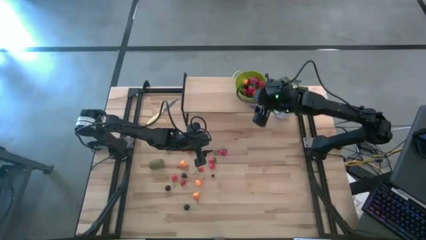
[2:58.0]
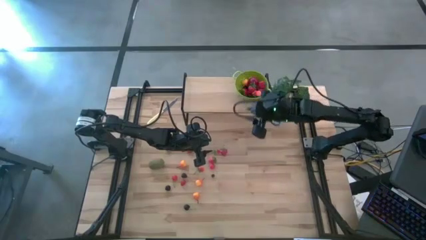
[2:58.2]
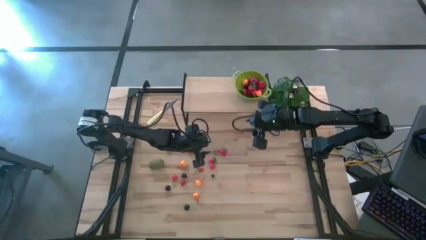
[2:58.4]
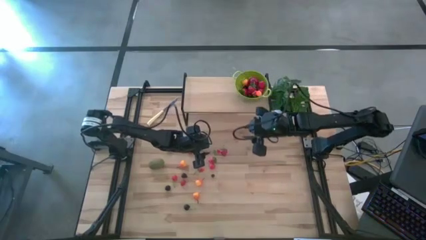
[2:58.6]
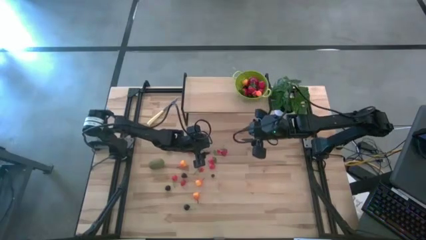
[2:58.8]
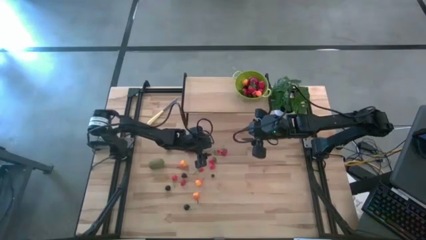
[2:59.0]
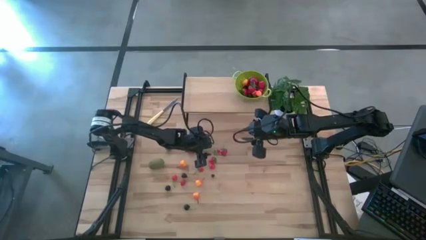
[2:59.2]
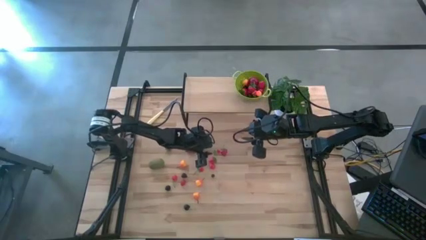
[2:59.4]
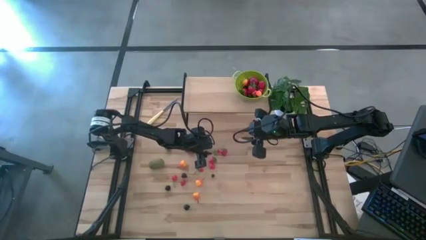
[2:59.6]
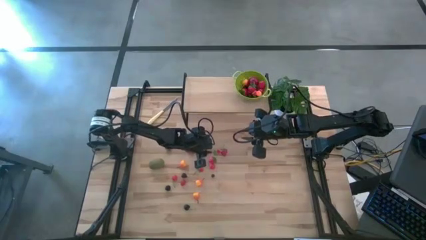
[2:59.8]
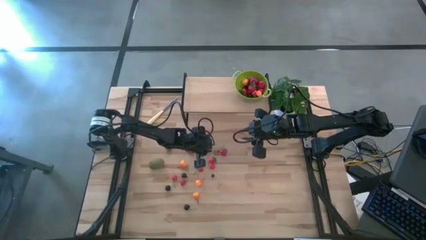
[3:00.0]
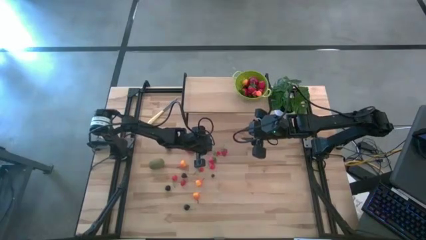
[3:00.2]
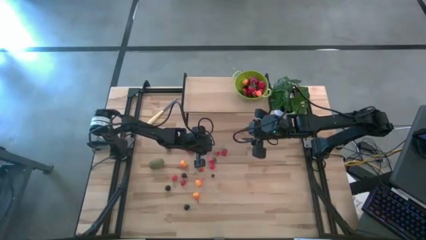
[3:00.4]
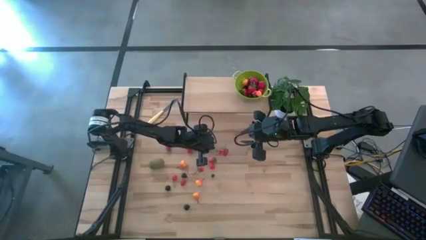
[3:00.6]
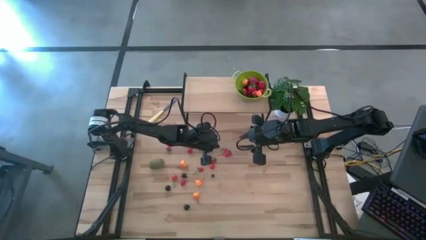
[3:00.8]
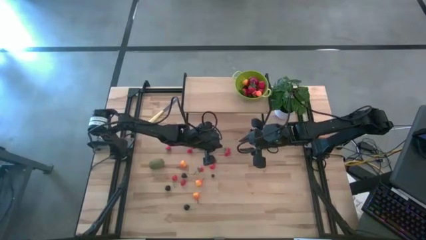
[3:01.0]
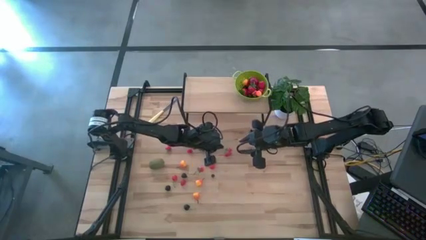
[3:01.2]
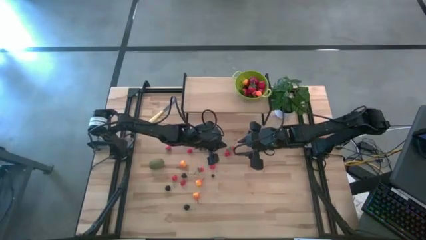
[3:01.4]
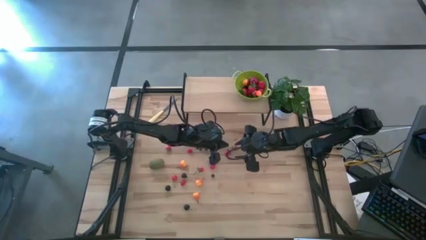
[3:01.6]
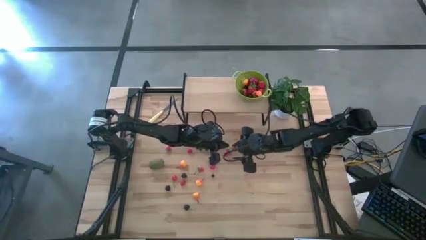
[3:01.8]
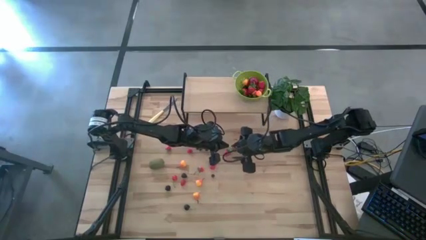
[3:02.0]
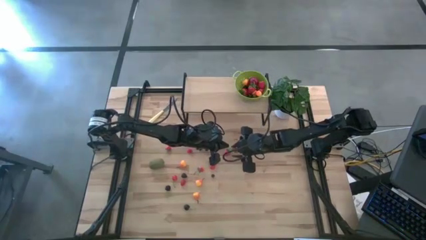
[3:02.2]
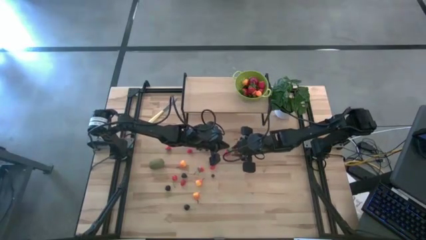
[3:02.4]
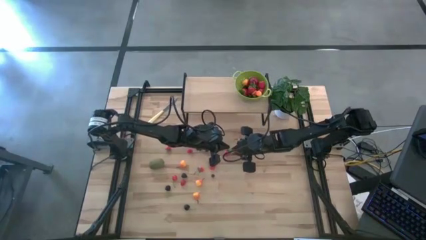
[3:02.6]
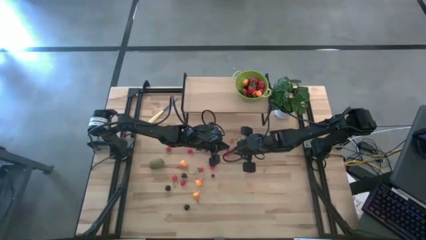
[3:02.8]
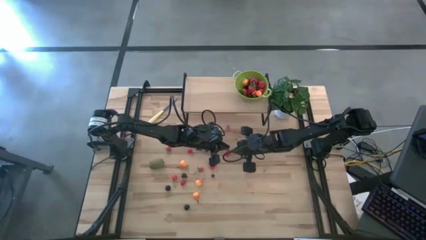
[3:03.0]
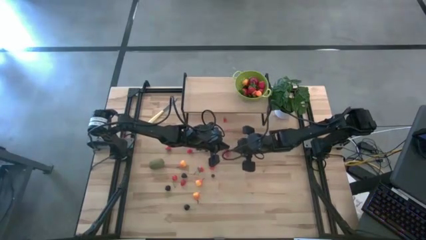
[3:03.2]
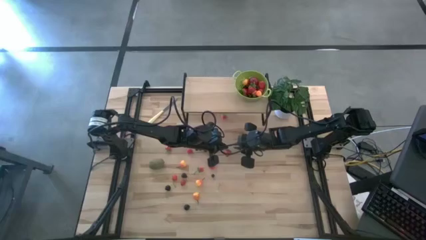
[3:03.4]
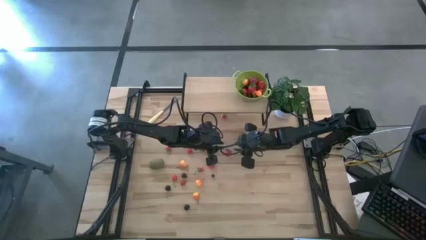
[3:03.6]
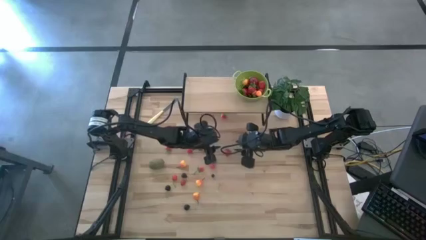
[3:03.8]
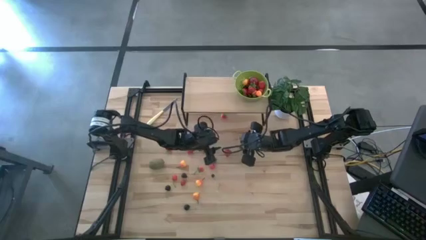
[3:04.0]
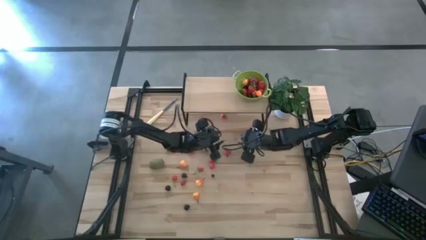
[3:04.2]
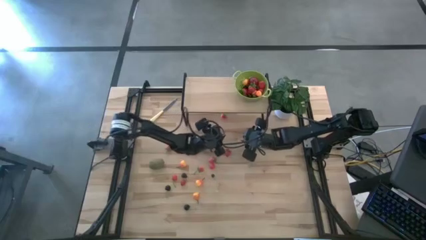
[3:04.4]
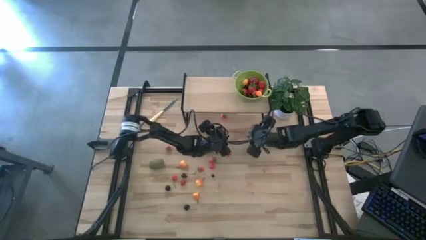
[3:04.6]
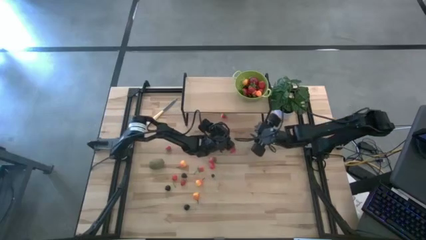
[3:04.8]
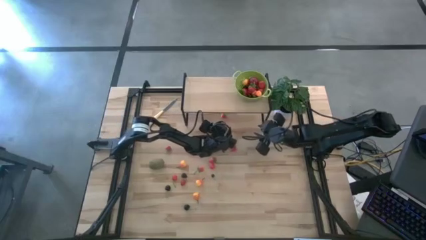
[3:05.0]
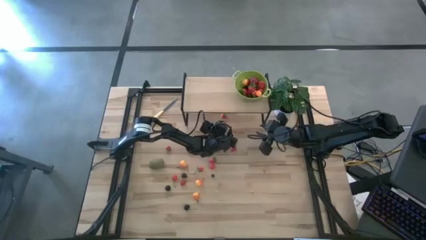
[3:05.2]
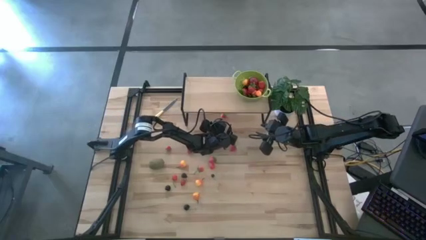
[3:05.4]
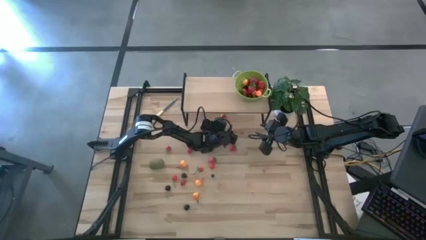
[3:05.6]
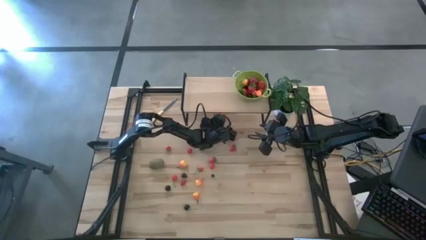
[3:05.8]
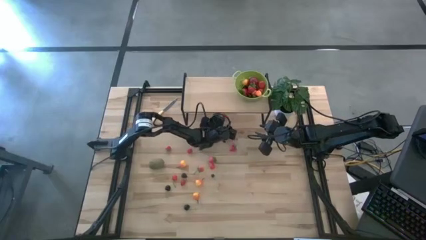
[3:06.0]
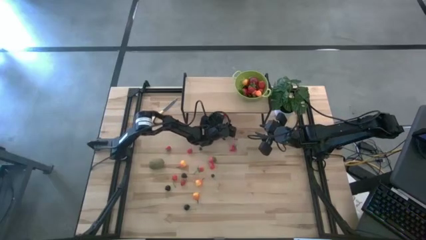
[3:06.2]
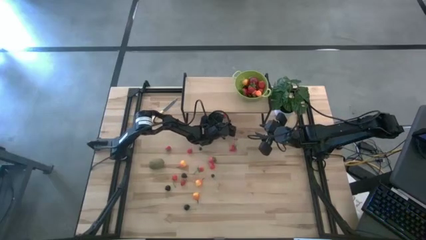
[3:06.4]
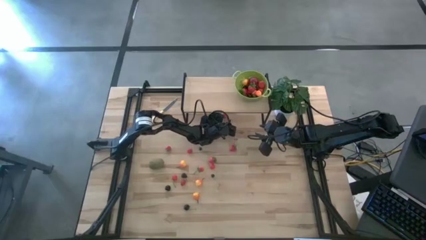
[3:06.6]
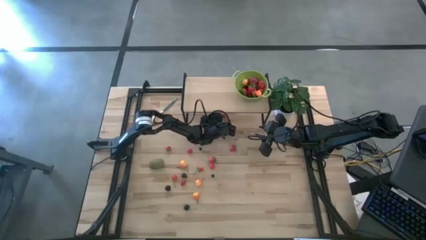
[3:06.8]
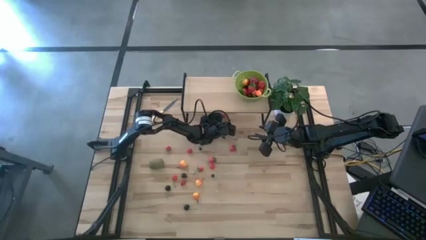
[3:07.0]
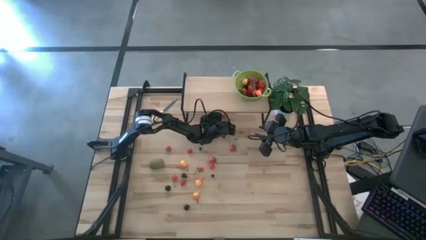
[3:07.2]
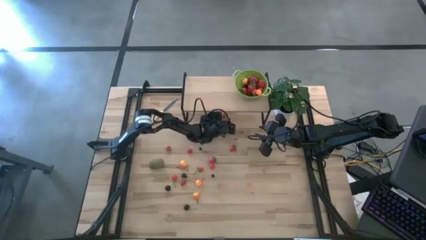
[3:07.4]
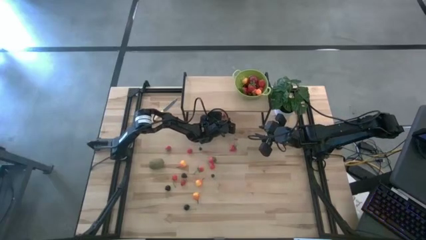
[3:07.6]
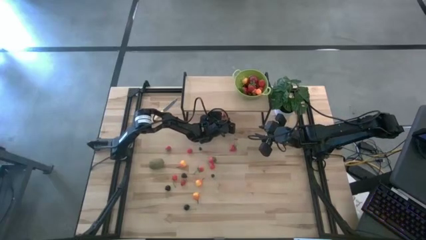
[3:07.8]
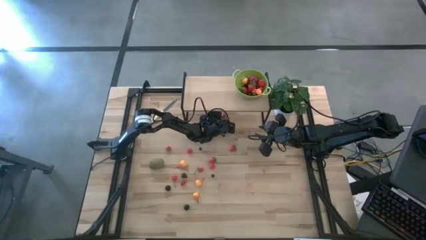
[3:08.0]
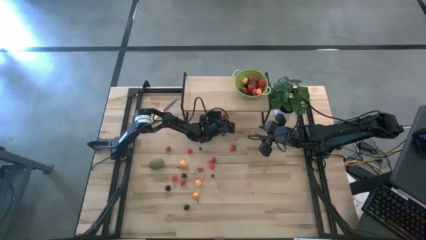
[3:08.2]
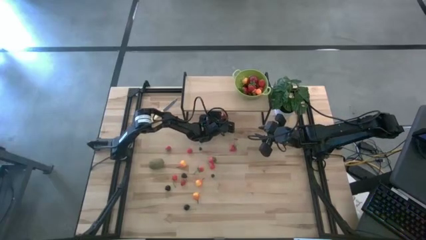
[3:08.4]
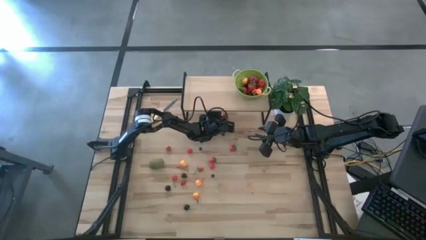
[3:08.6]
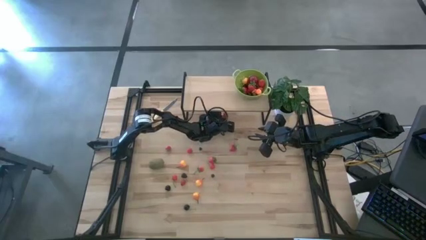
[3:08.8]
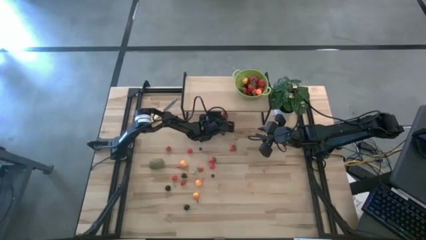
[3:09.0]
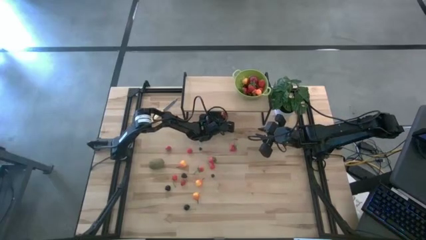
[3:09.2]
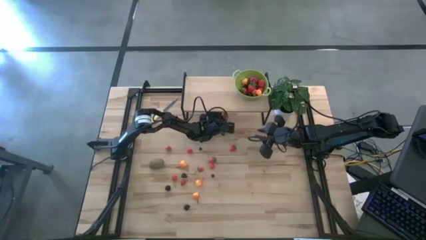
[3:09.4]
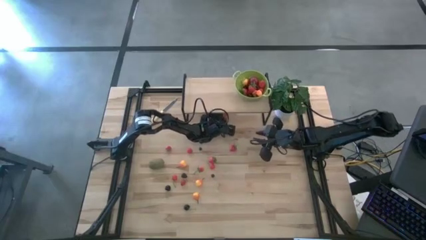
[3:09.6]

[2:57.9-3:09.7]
Task: Build produce basket
Put the strawberry into the green basket

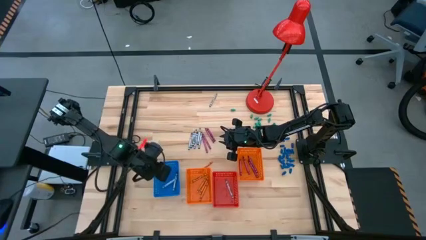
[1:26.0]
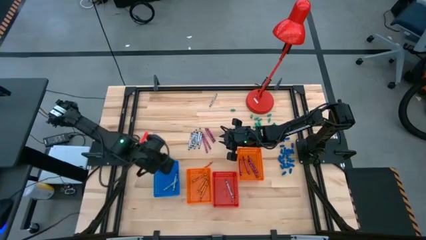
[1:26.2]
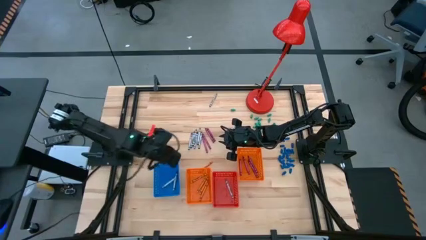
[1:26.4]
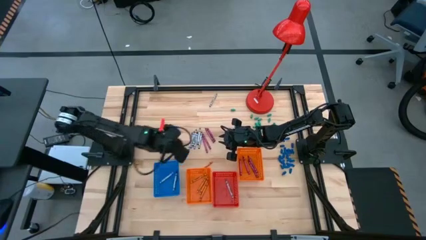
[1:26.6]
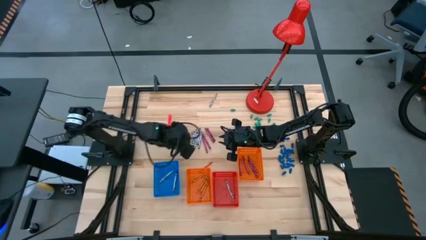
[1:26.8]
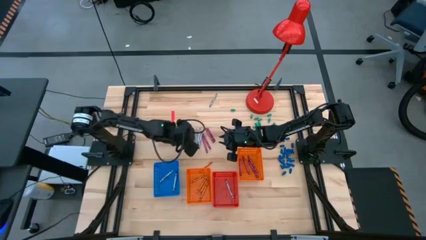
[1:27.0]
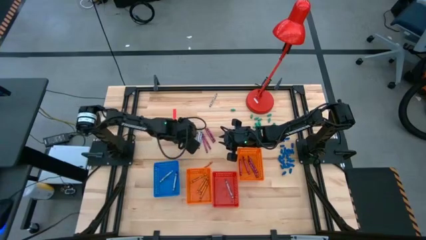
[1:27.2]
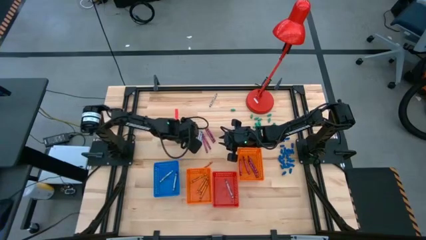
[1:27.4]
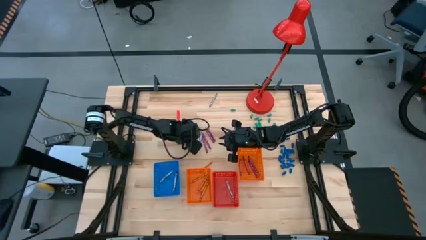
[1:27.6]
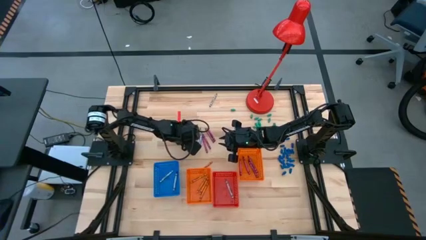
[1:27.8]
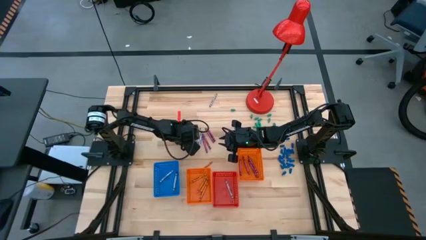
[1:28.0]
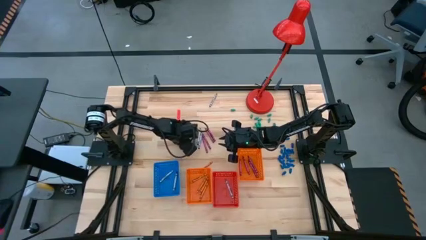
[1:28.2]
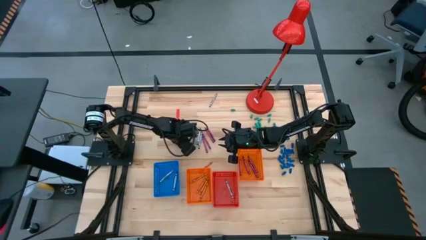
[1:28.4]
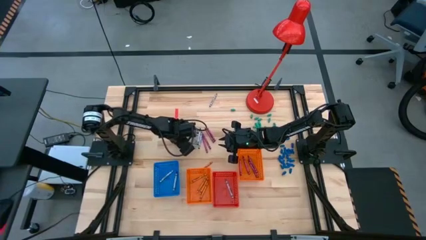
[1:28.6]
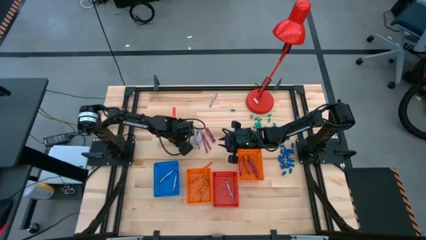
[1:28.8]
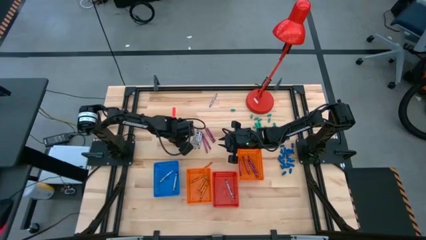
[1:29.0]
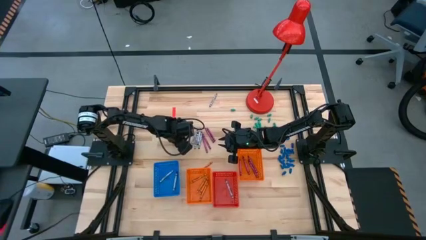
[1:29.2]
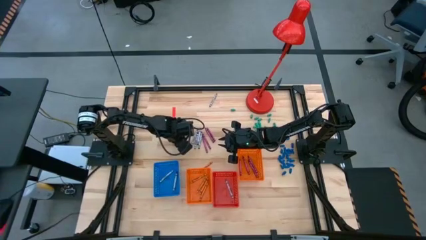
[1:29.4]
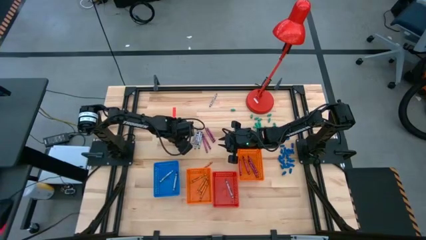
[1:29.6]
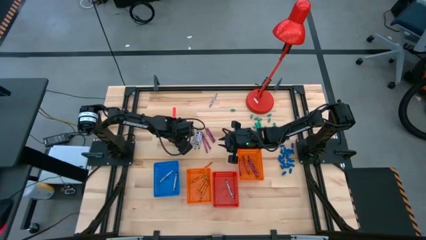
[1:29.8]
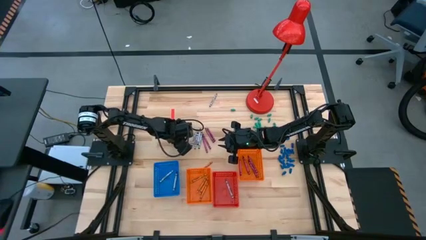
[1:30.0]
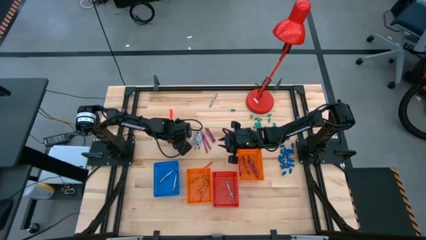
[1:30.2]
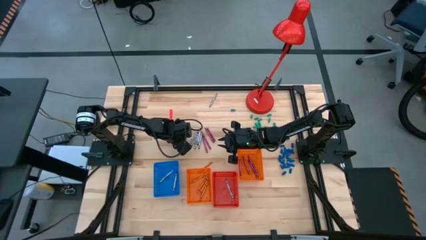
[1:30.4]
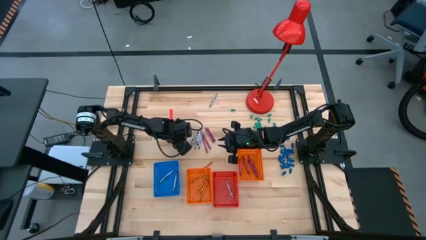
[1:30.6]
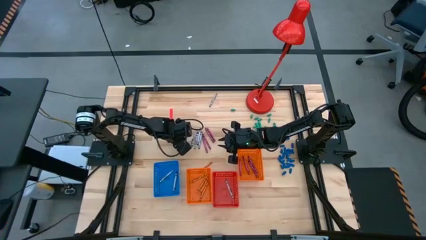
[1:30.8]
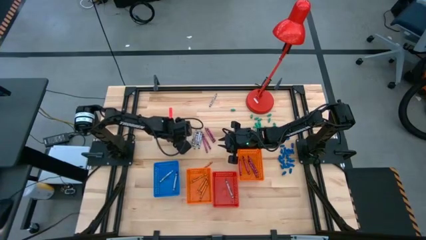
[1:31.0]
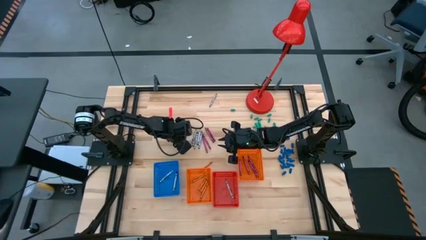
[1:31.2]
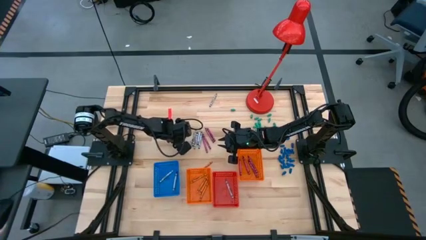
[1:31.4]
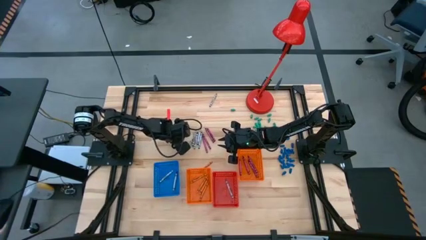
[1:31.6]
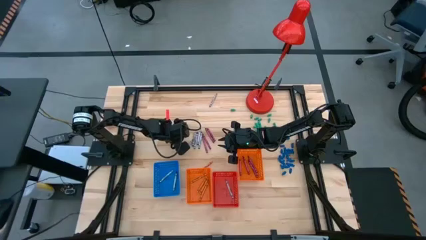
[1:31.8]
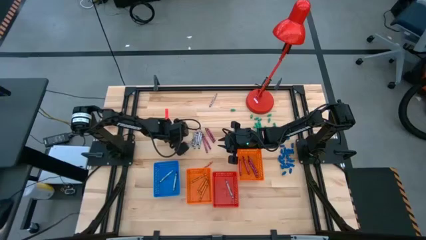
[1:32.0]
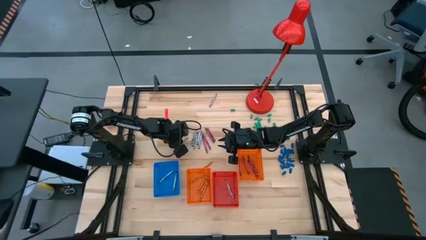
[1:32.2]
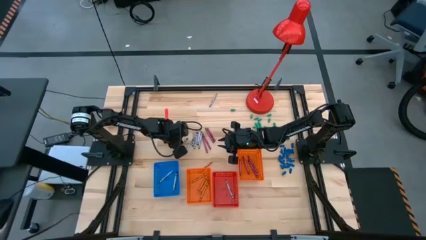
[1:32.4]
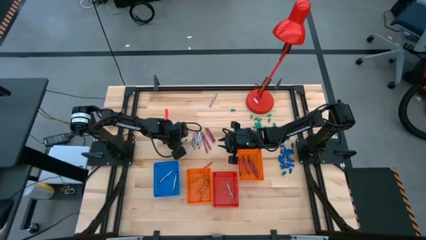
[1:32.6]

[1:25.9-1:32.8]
Task: Sort crayons
Put the black crayon into the blue bin
